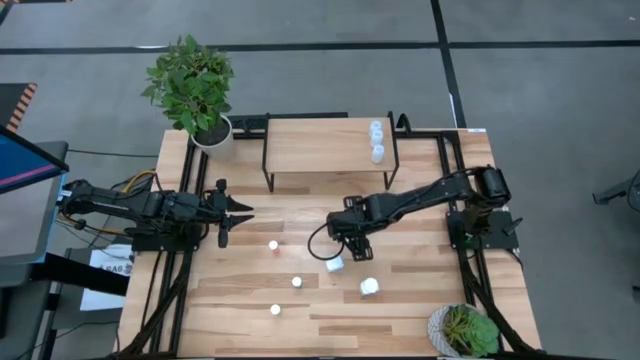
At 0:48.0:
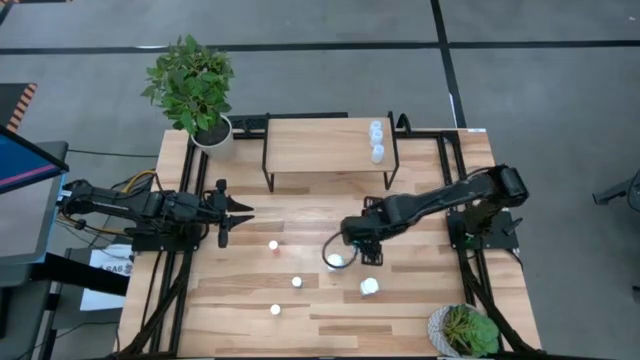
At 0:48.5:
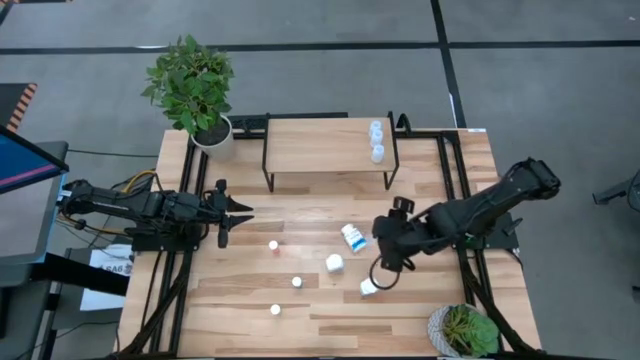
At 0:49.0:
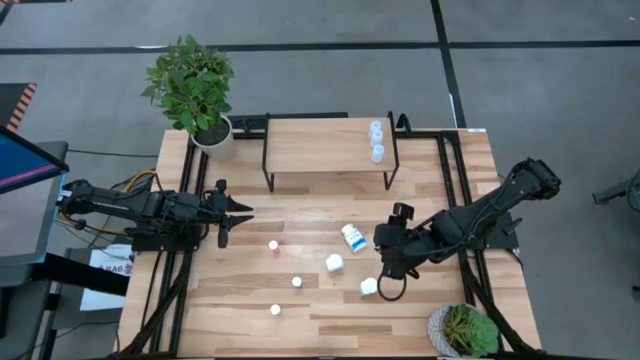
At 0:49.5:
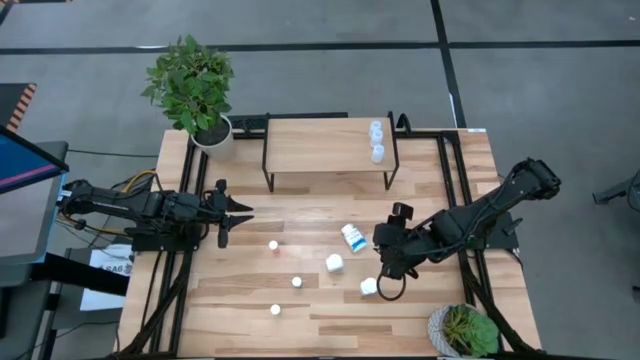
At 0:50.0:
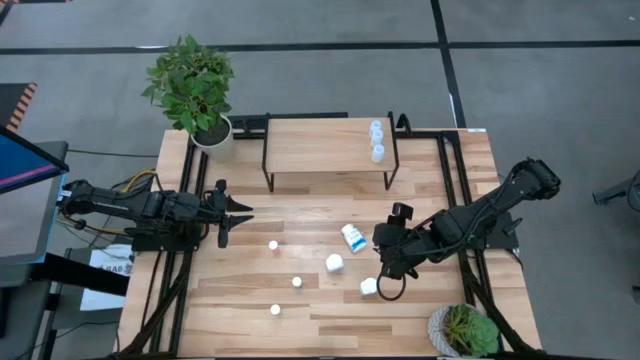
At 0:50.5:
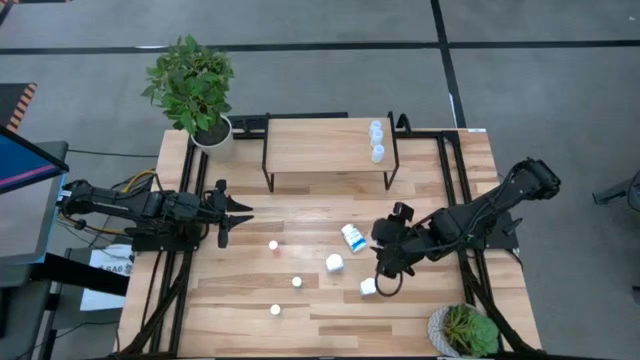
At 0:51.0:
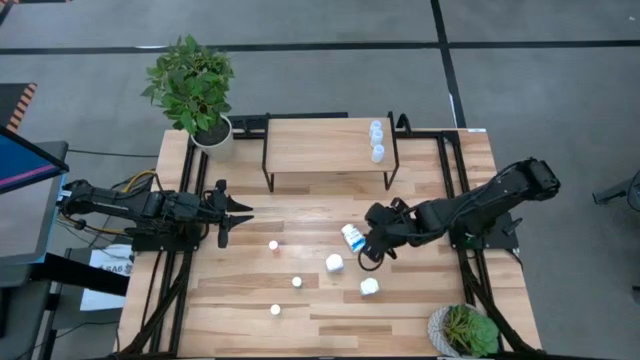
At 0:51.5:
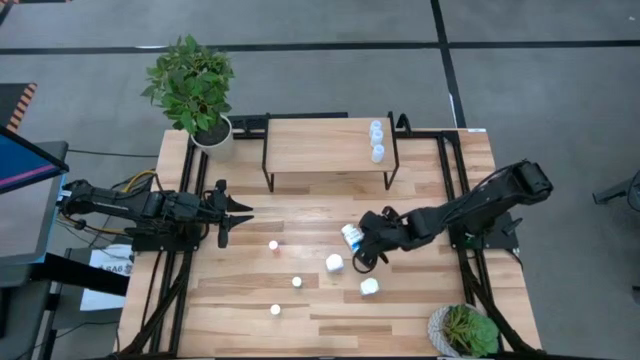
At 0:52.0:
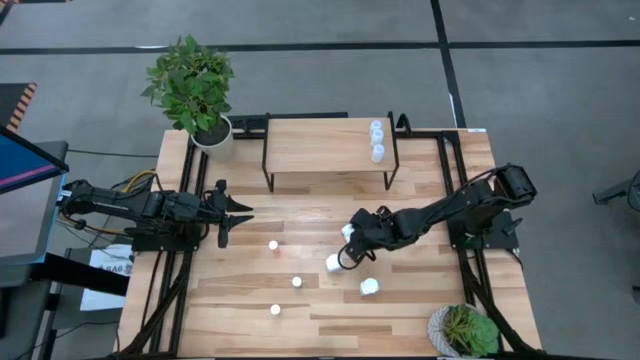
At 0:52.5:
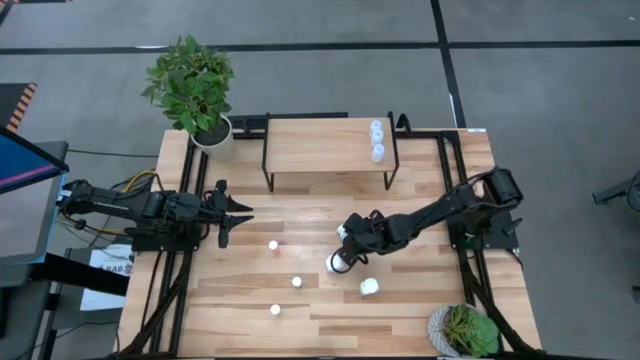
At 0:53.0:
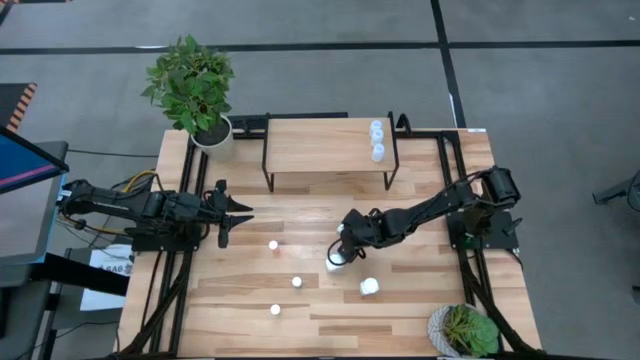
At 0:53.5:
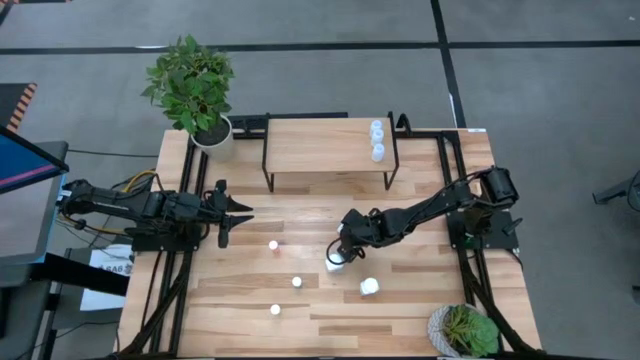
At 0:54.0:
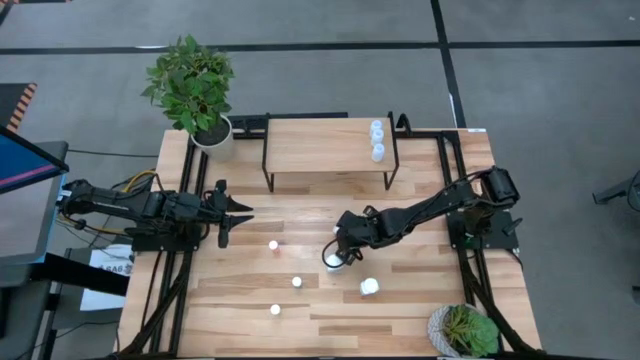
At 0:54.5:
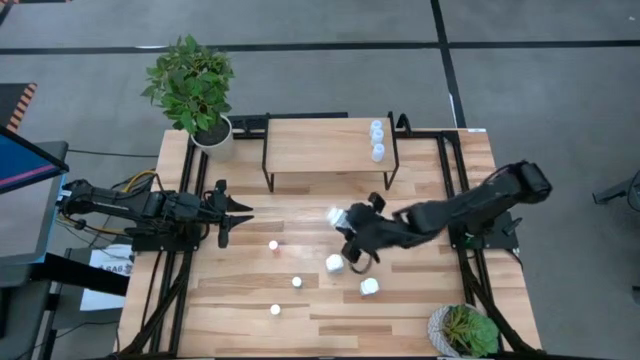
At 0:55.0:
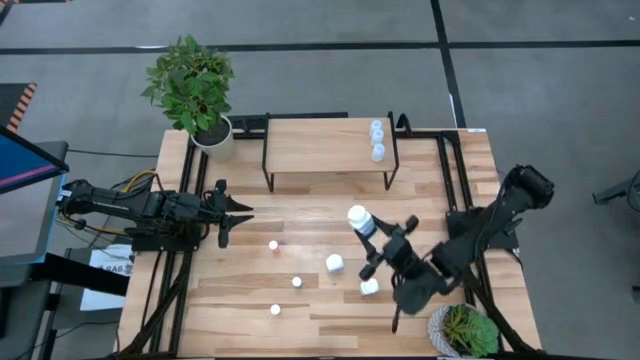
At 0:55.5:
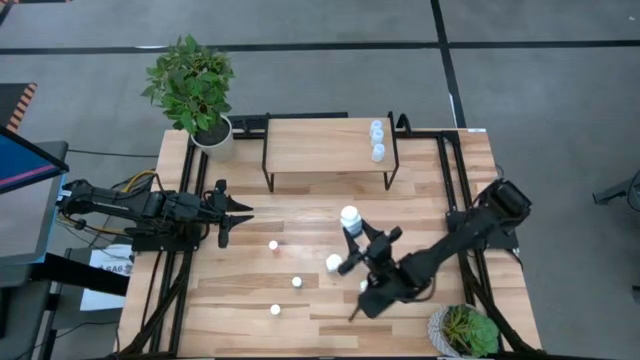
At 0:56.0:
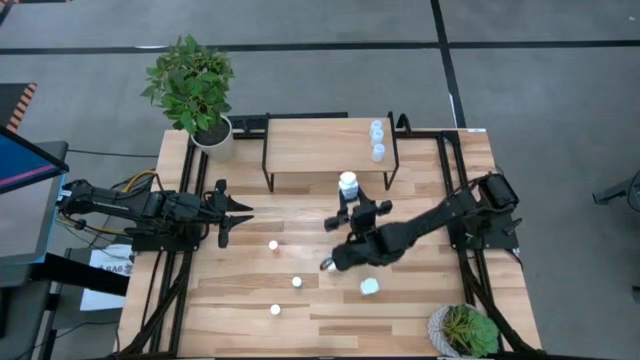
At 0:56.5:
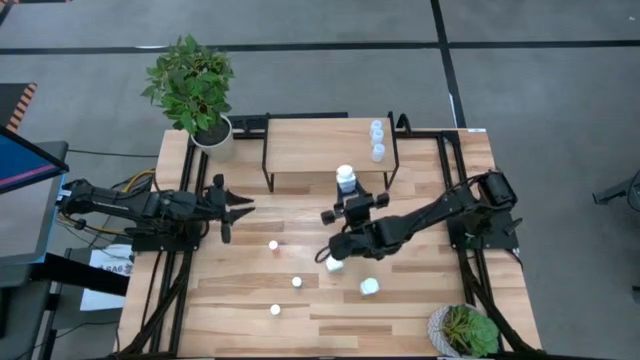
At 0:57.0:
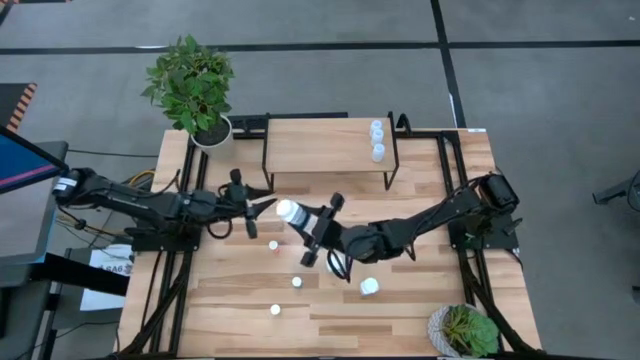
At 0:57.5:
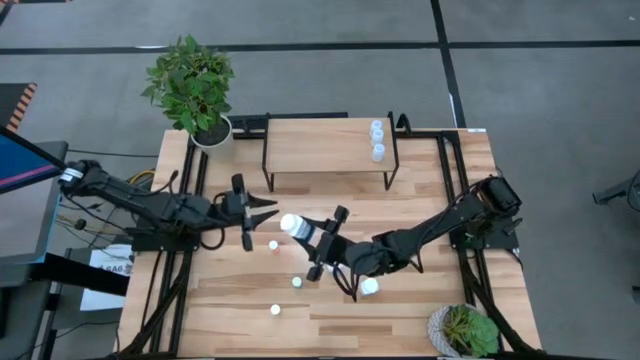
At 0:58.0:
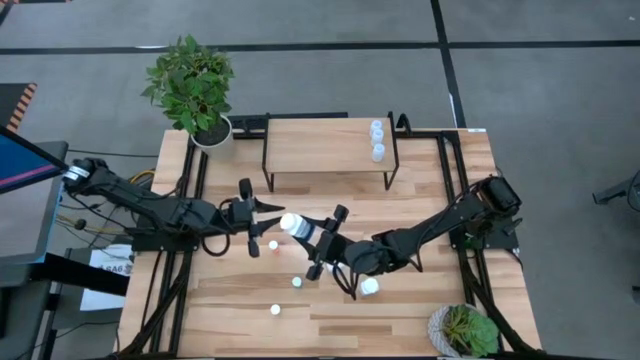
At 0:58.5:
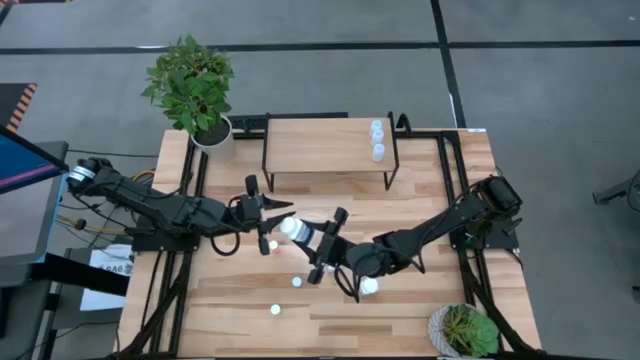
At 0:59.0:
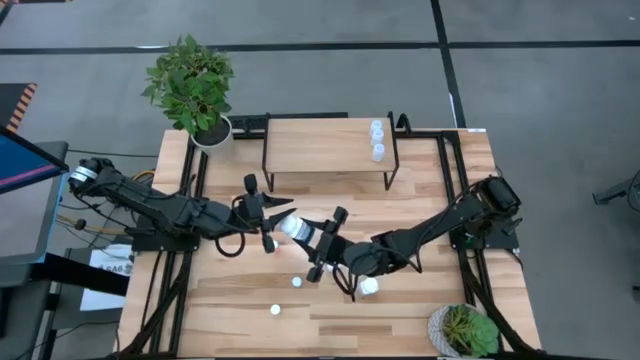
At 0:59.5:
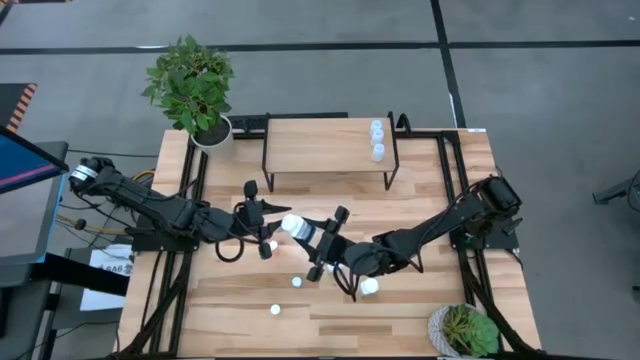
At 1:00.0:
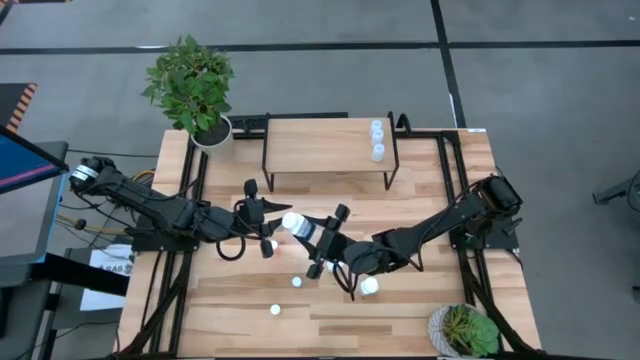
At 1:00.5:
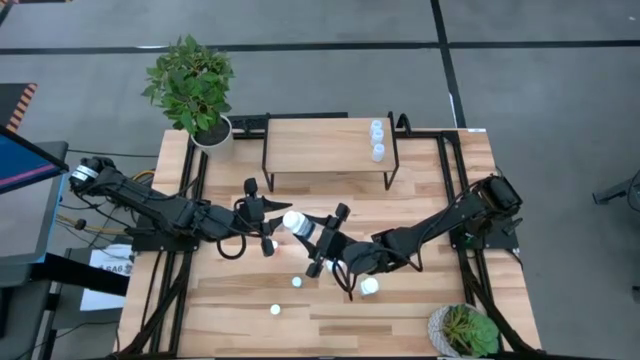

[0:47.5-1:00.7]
Task: Pick and place medicine bottles onto shelf by color
Put the top white medicine bottle on the shelf

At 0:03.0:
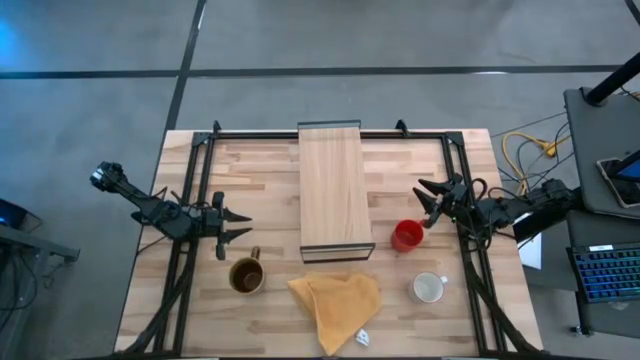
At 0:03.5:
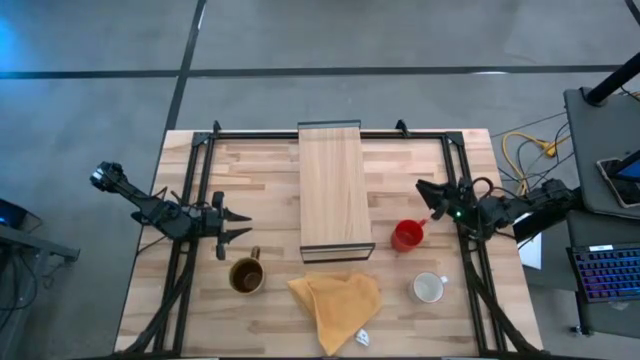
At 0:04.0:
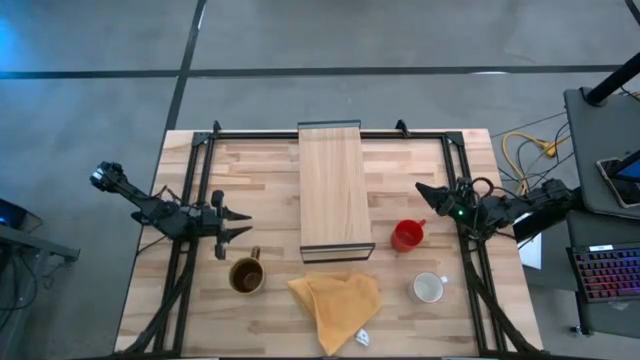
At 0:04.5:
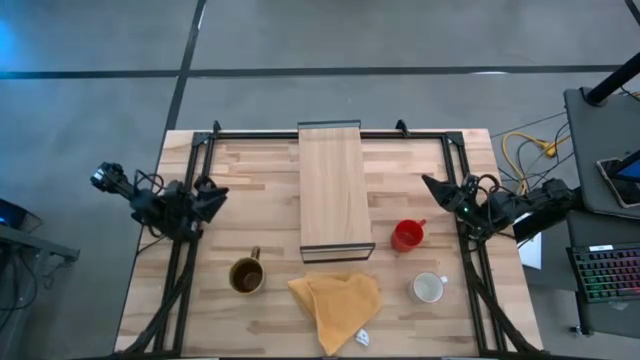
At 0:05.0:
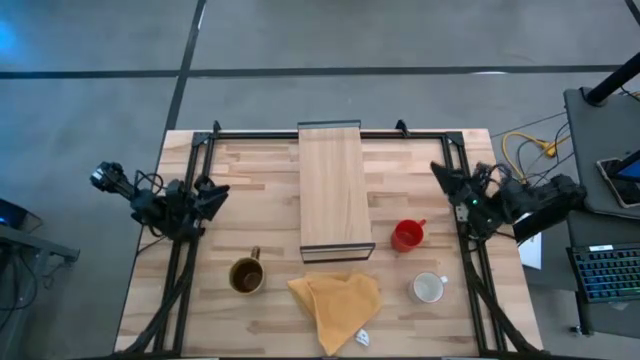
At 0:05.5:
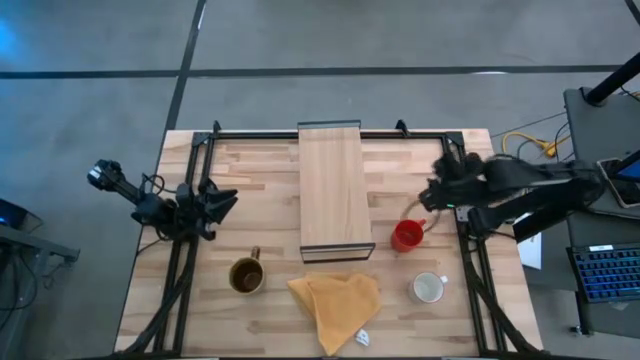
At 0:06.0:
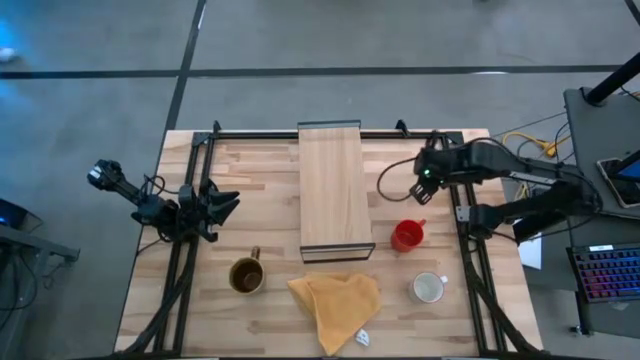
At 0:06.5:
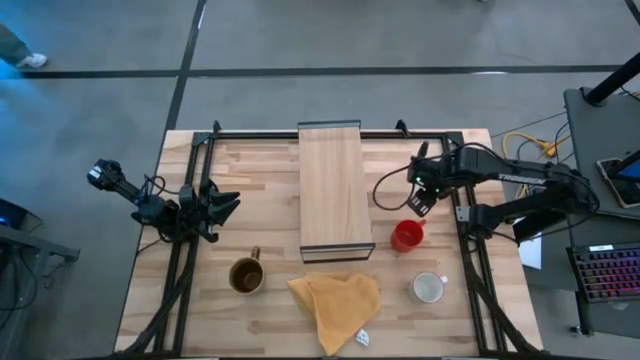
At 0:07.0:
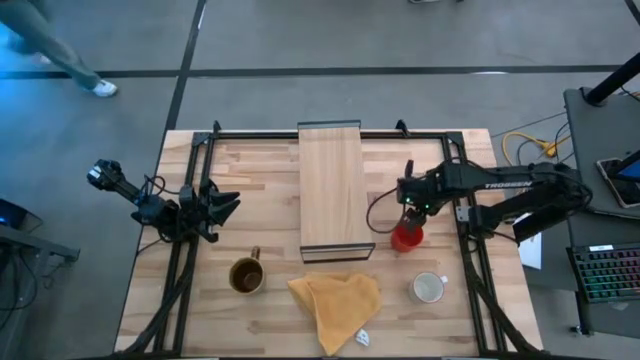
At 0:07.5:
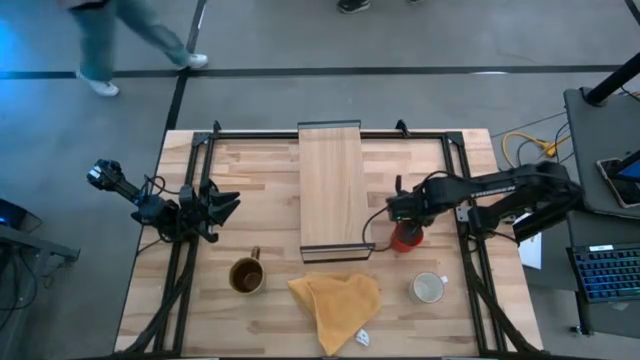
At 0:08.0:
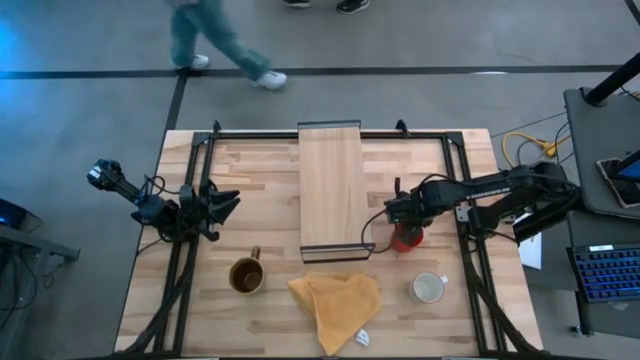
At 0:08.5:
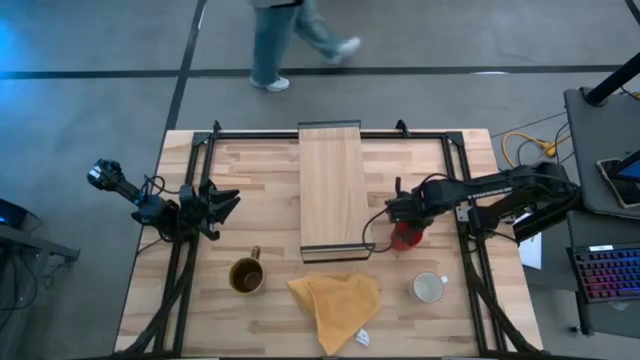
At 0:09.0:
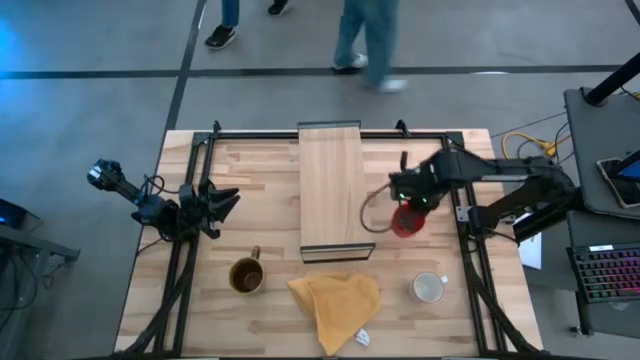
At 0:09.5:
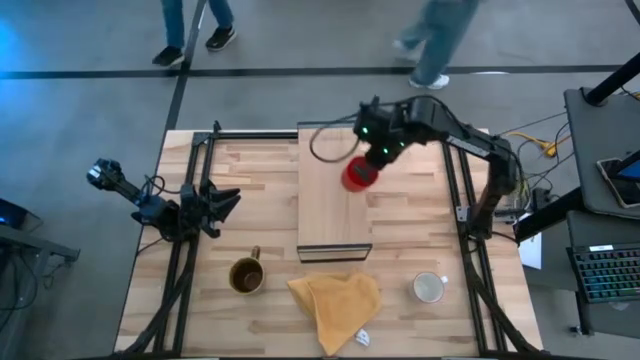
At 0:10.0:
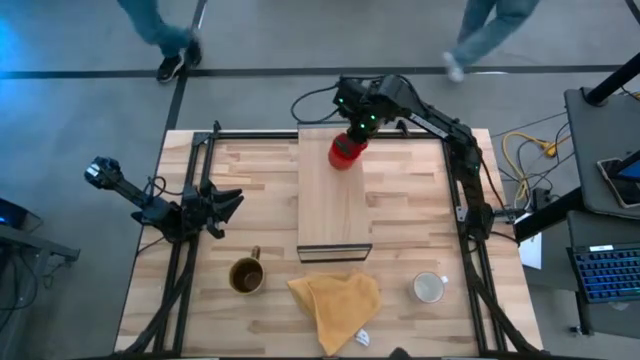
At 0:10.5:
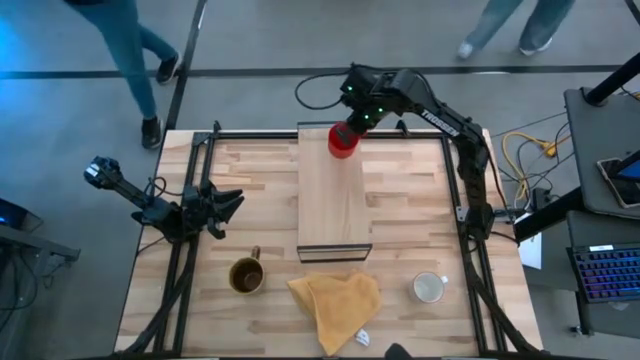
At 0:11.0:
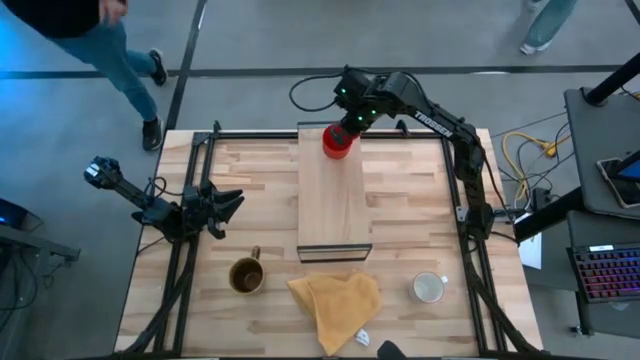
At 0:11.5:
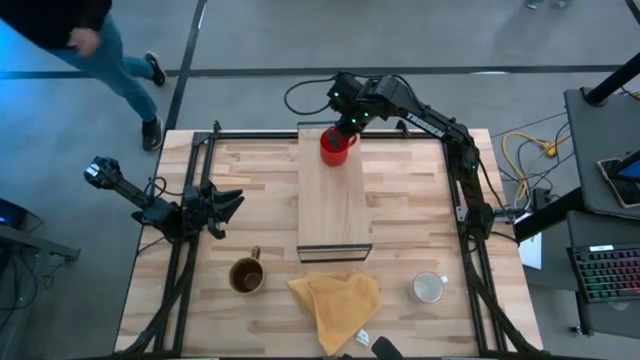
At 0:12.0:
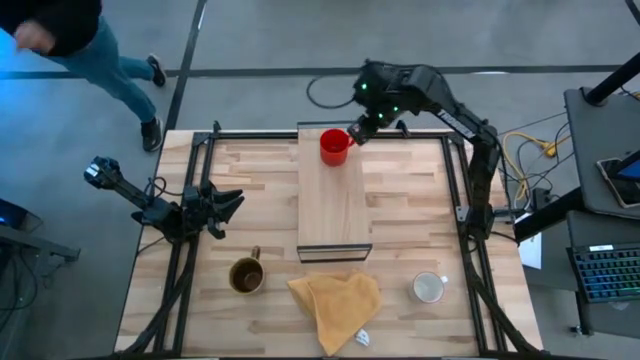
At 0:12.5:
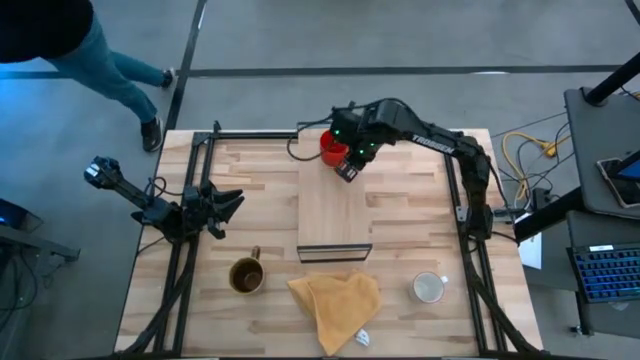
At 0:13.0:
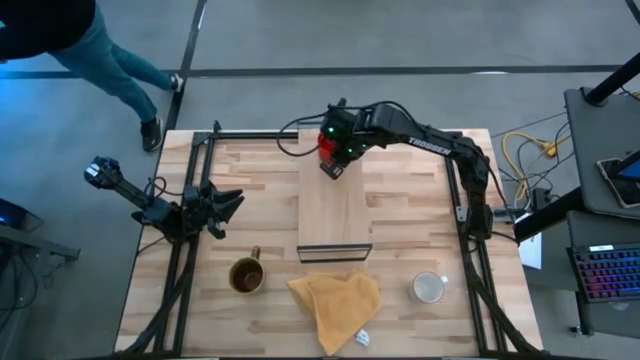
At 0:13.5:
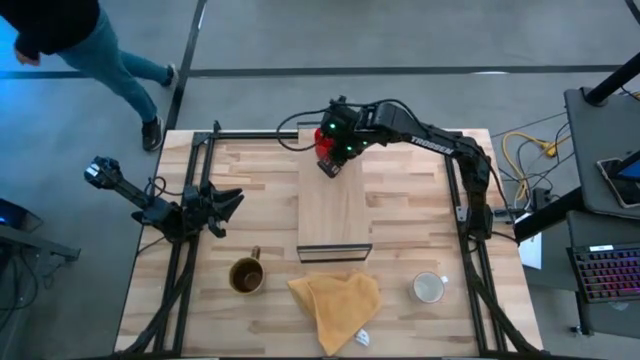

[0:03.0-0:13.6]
Task: Stack small to large cups/mugs on shelf
Put the orange mug on the shelf
